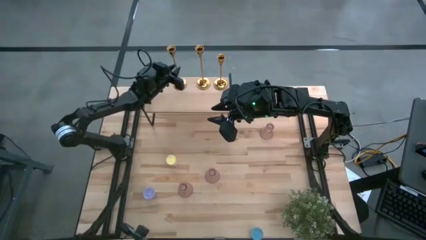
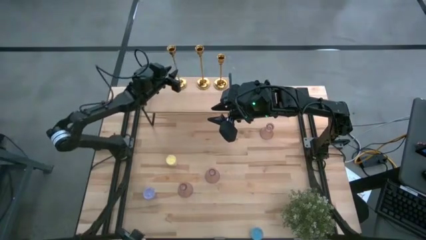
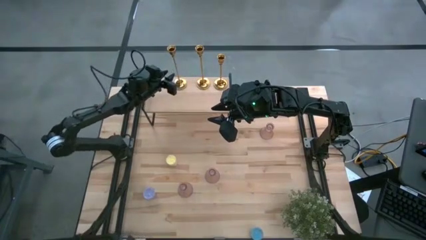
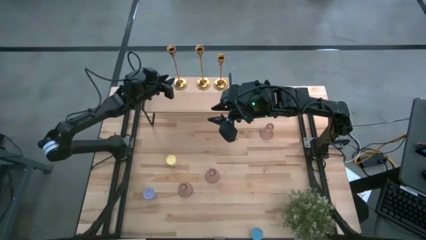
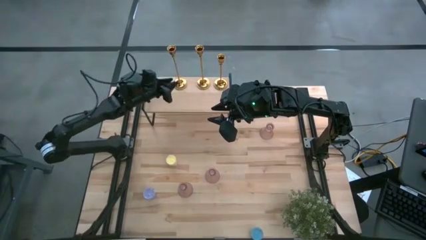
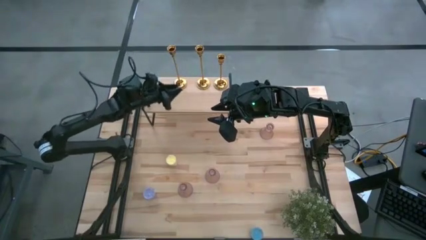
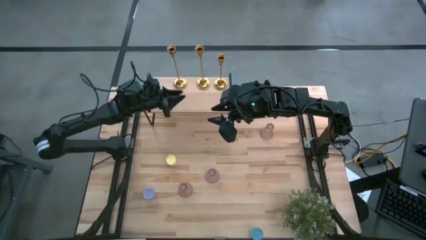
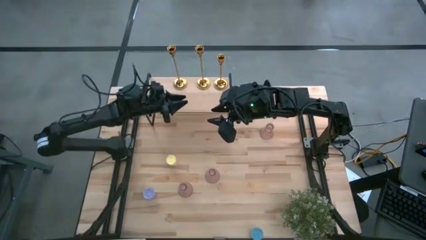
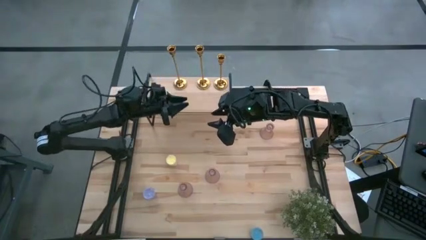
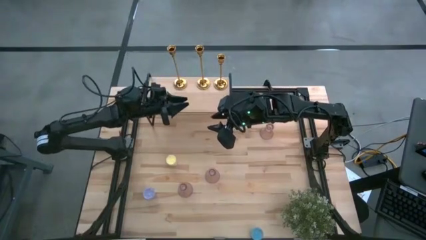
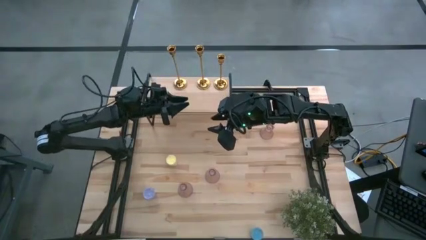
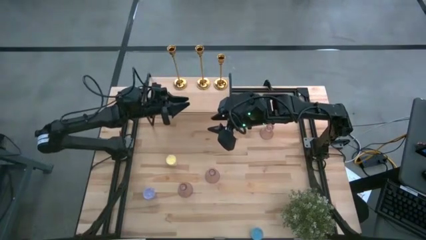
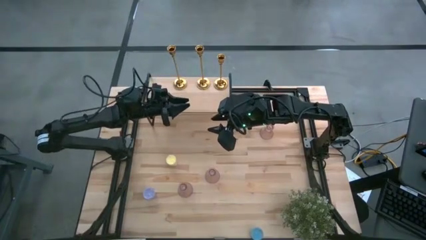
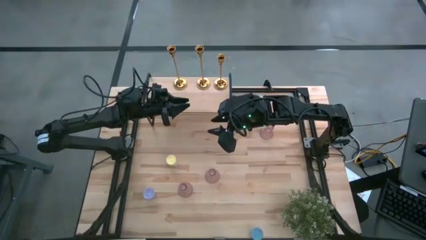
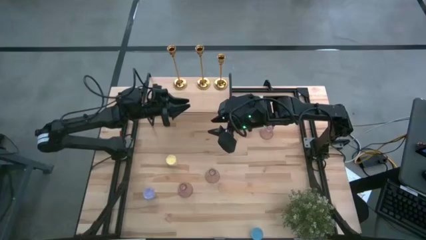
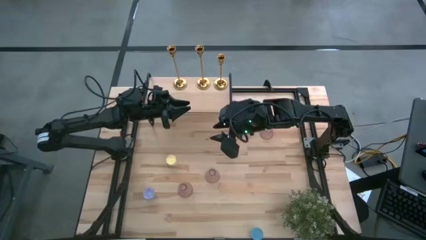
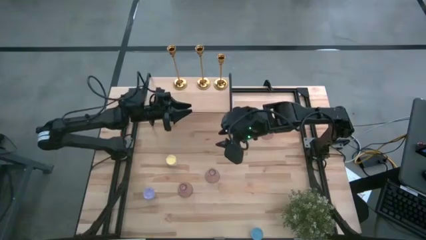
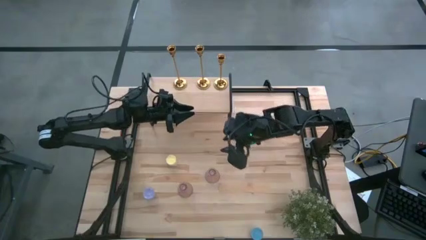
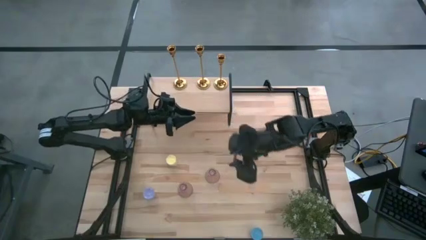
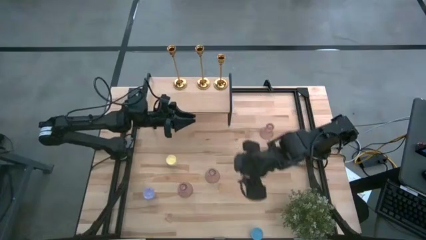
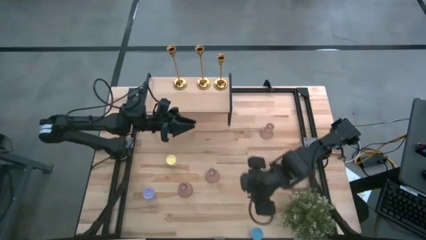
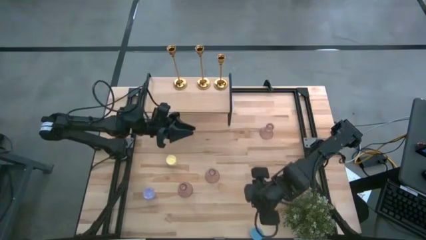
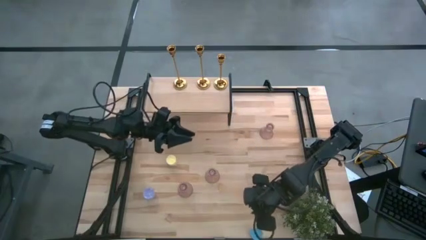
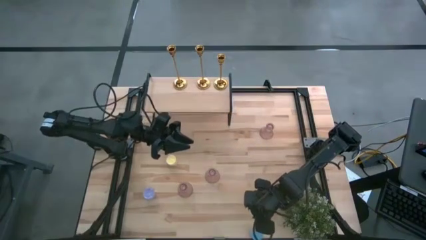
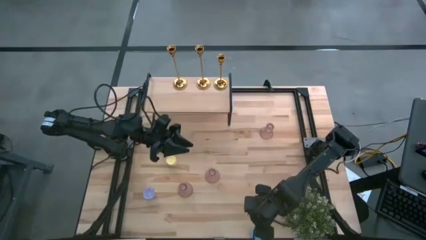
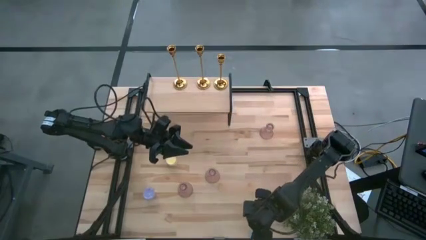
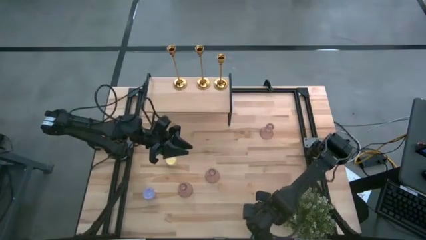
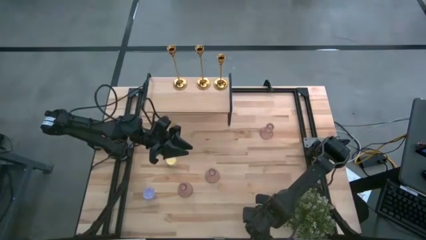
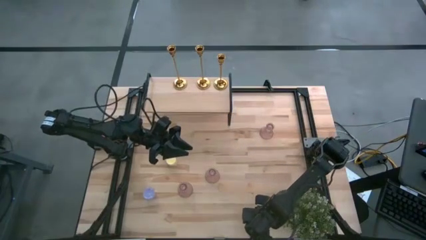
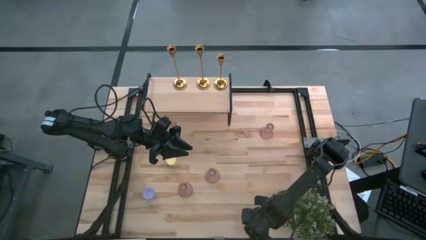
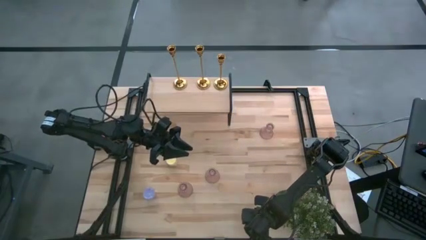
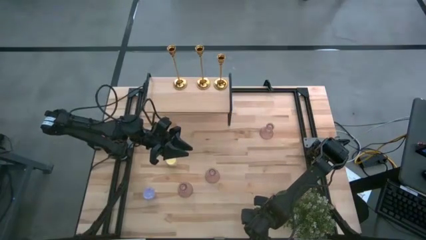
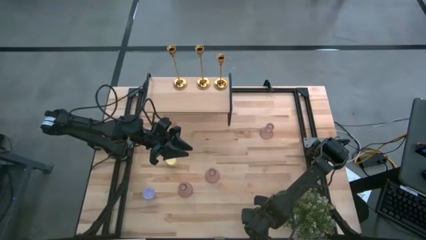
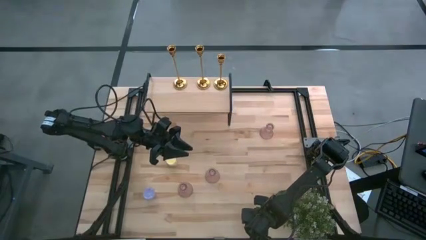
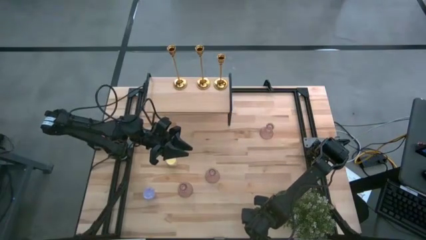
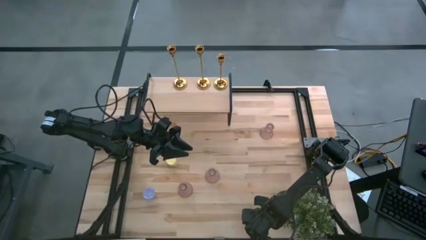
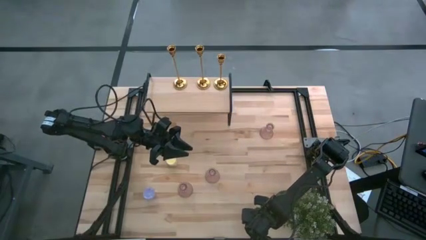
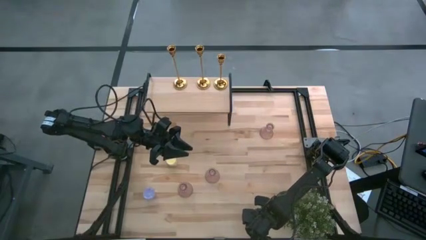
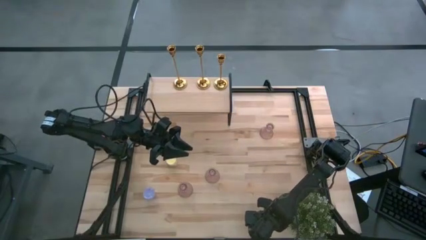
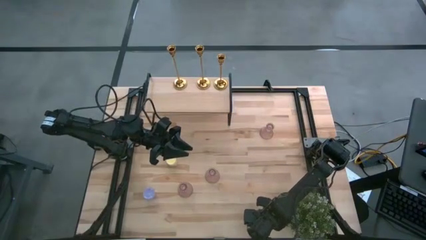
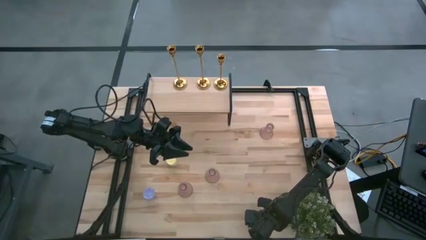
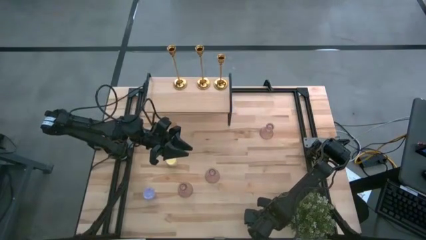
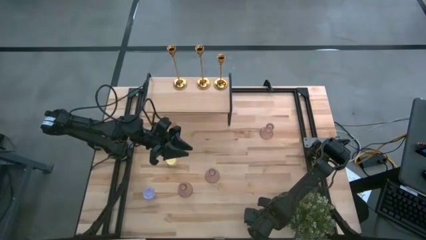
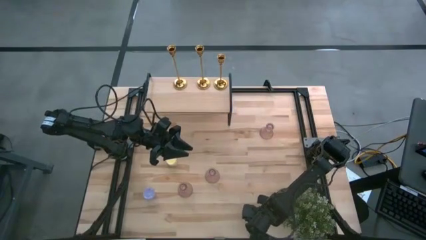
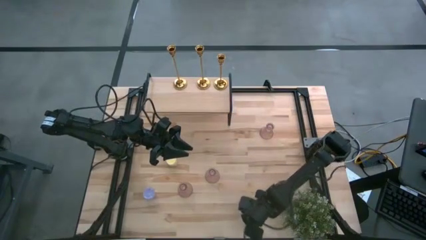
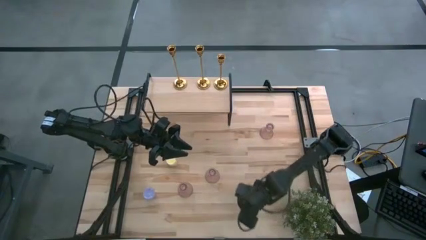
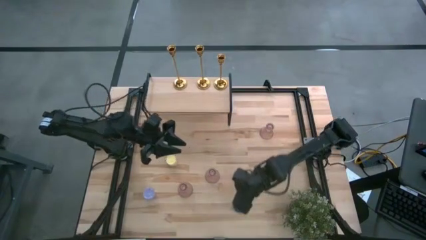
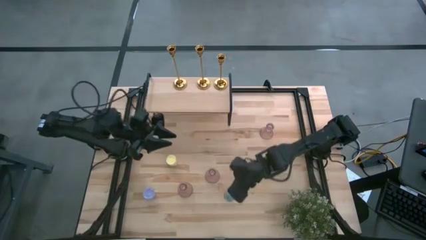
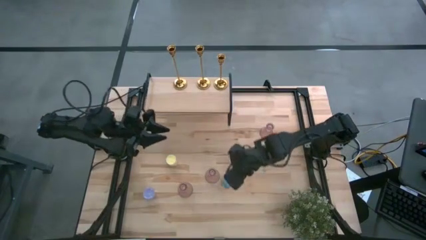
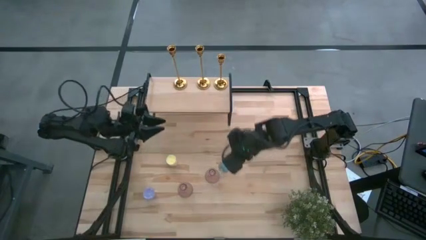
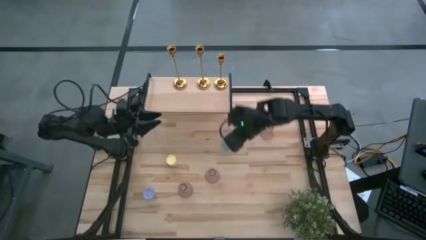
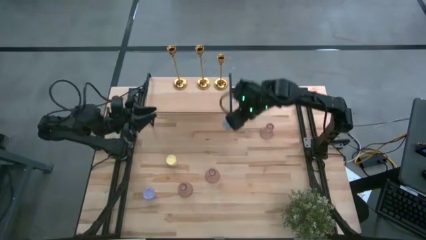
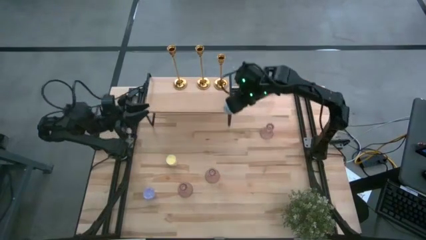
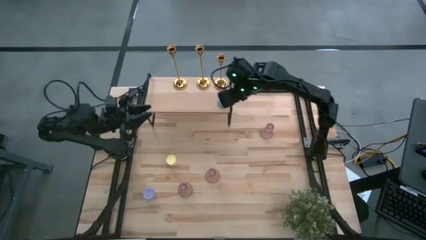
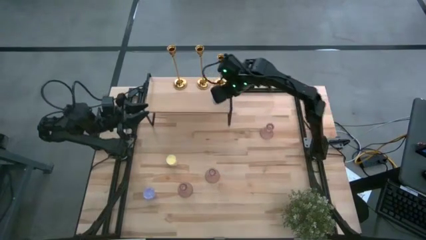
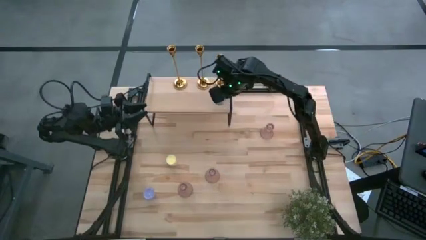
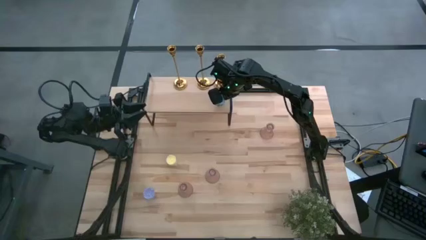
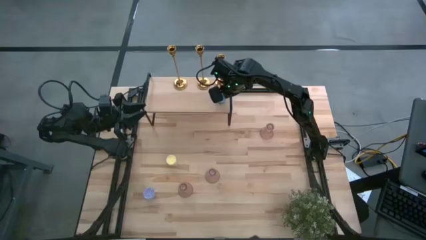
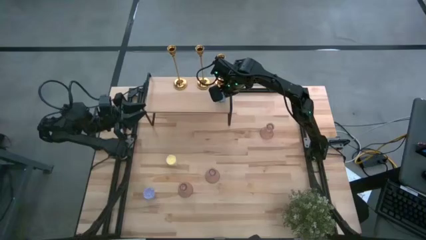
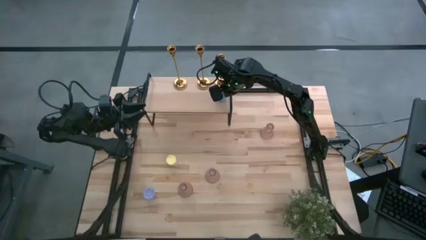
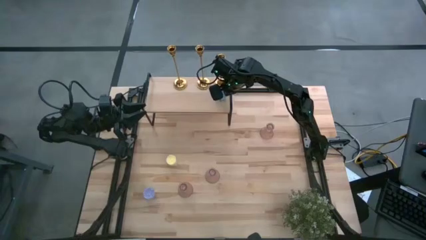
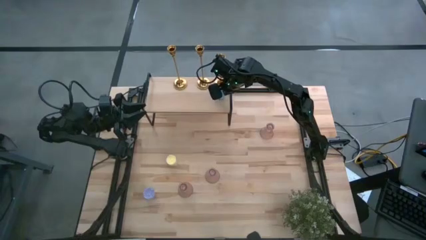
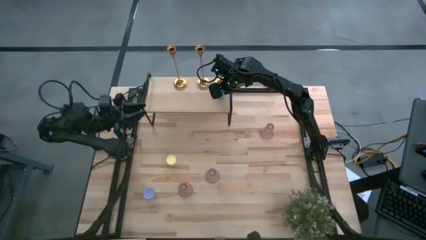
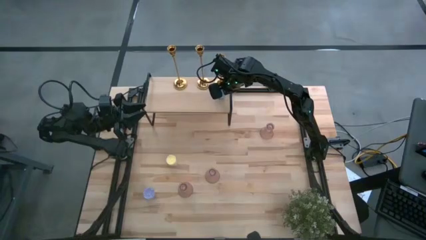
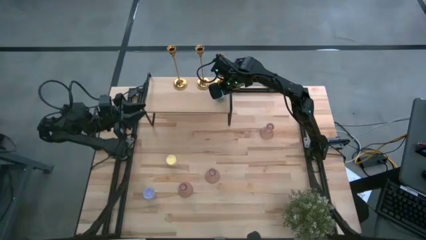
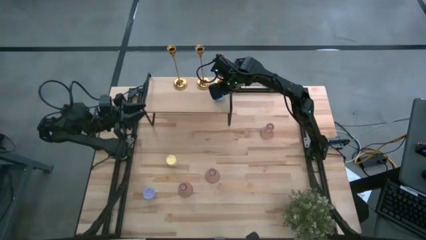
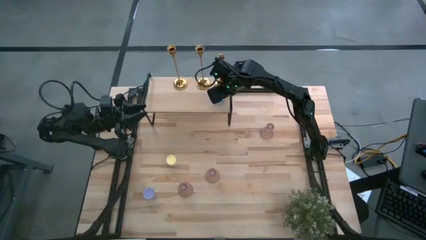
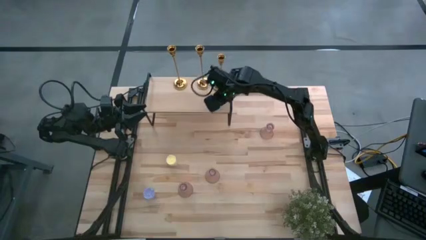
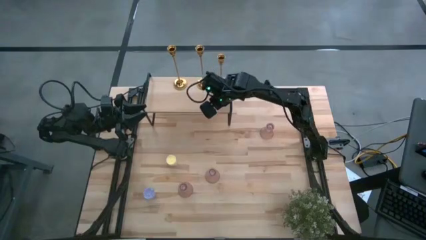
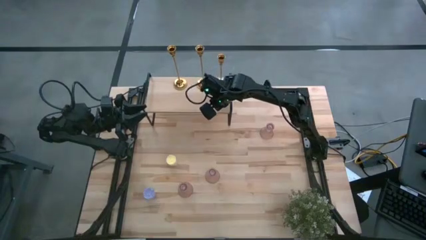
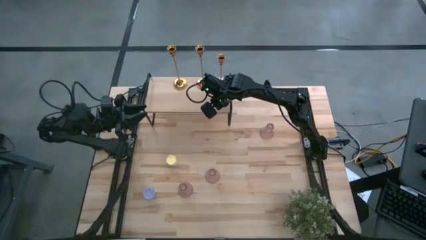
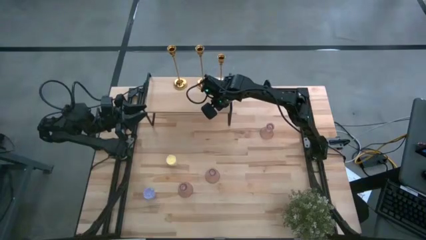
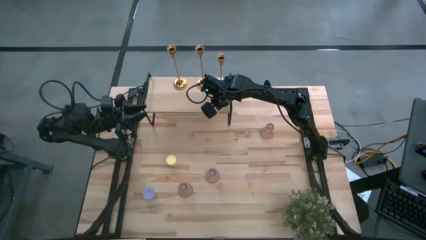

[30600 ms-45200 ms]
Task: Pick & Place candle stick holders
Put the blue scented candle on the shelf
